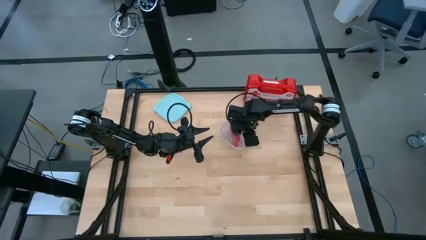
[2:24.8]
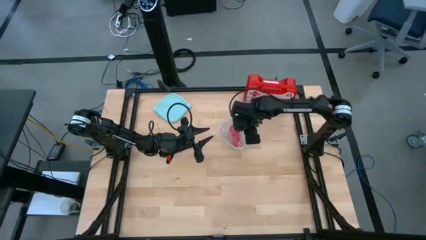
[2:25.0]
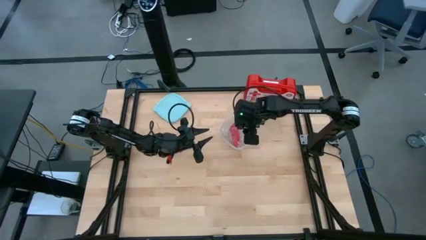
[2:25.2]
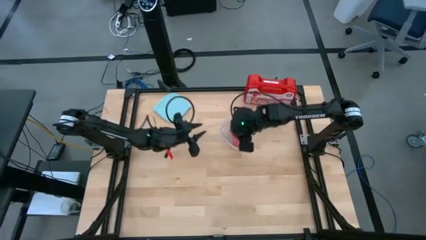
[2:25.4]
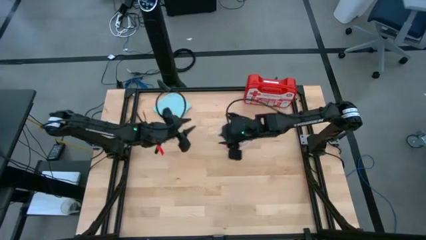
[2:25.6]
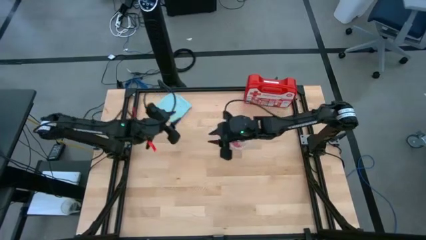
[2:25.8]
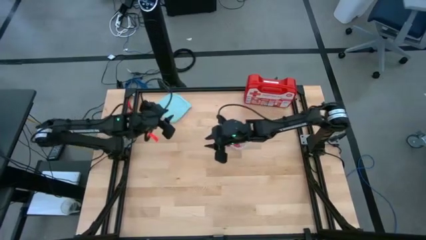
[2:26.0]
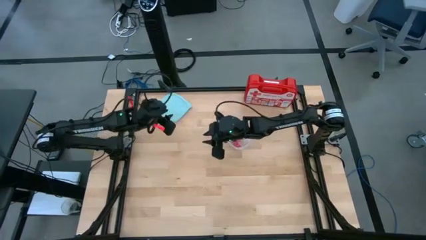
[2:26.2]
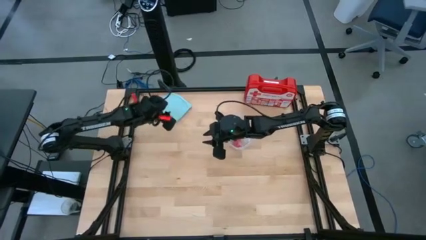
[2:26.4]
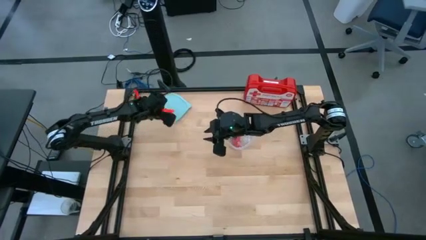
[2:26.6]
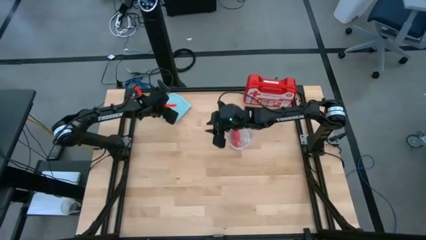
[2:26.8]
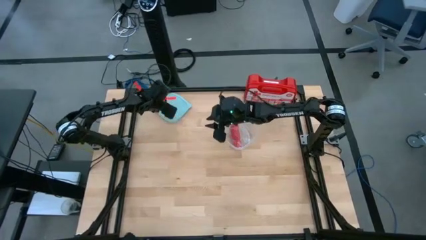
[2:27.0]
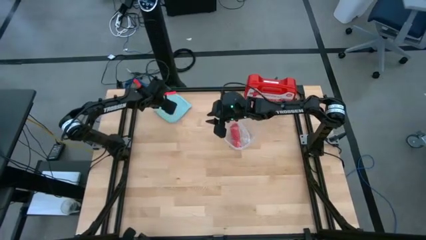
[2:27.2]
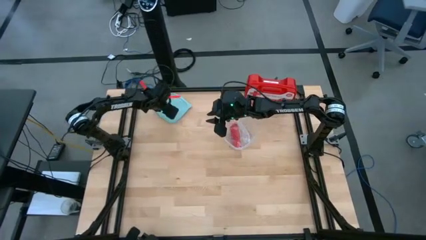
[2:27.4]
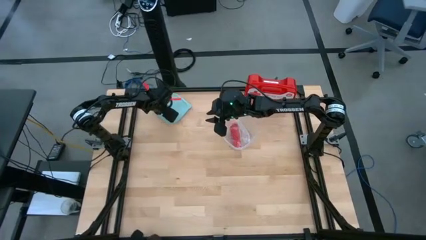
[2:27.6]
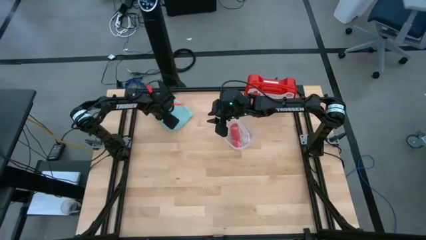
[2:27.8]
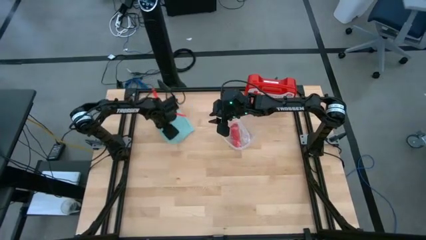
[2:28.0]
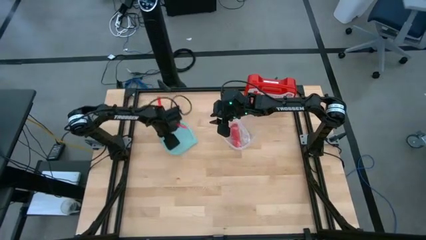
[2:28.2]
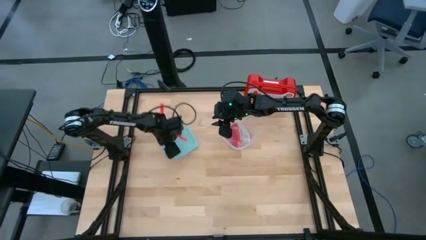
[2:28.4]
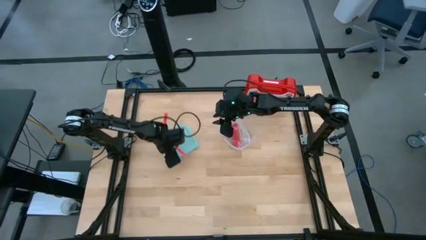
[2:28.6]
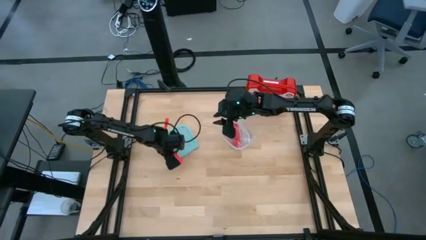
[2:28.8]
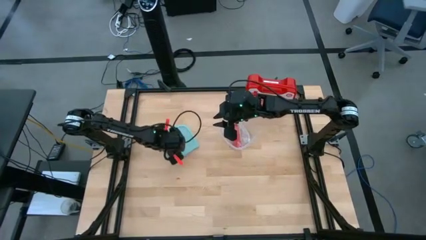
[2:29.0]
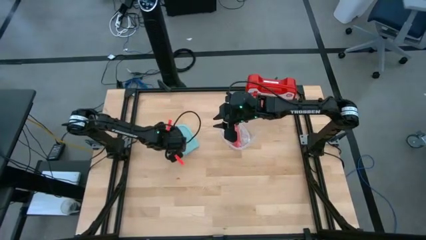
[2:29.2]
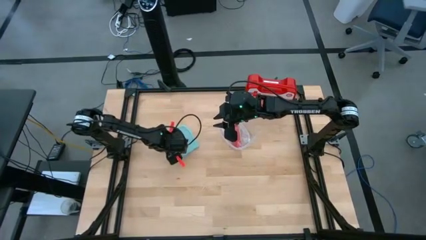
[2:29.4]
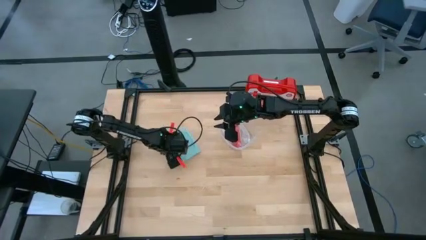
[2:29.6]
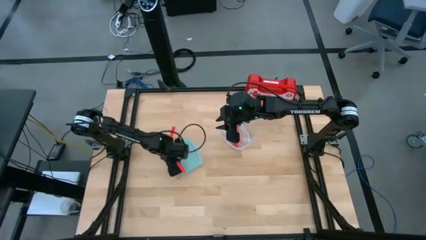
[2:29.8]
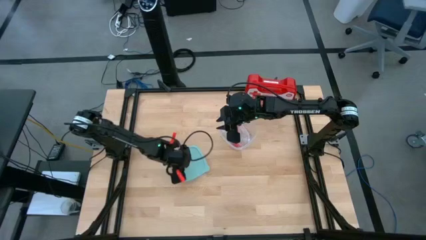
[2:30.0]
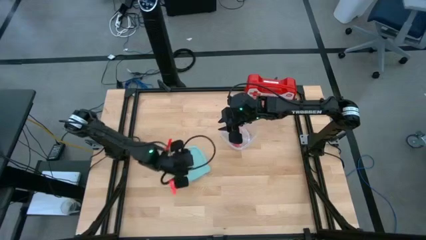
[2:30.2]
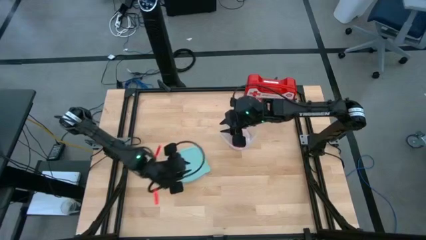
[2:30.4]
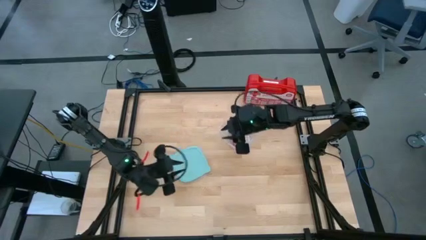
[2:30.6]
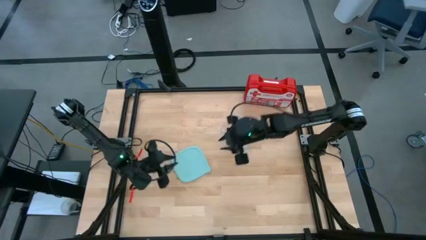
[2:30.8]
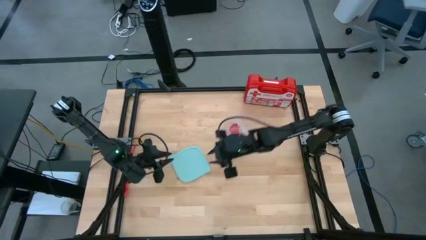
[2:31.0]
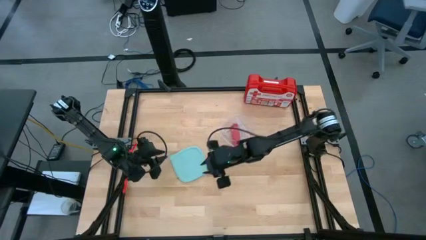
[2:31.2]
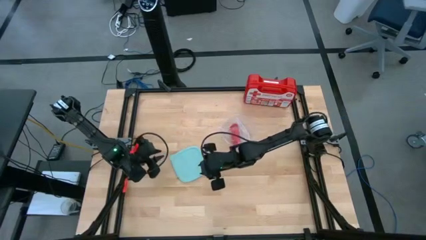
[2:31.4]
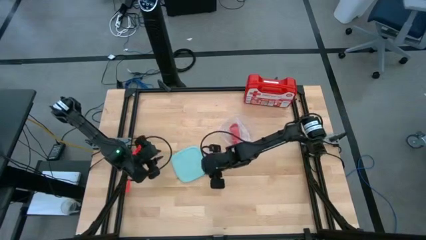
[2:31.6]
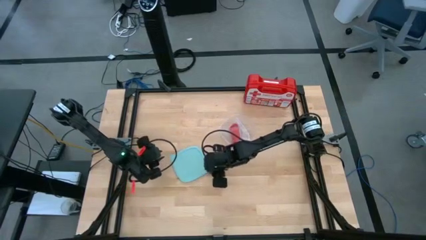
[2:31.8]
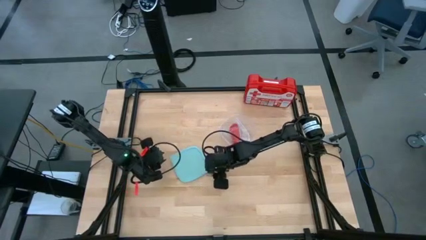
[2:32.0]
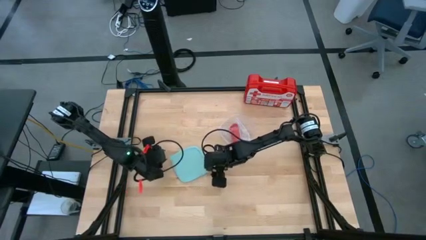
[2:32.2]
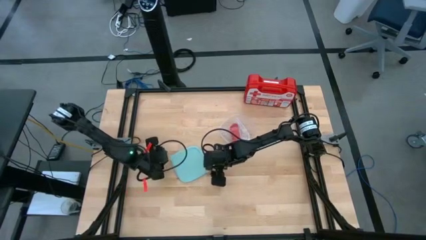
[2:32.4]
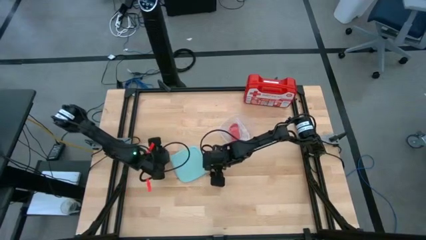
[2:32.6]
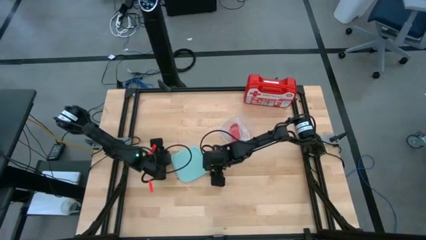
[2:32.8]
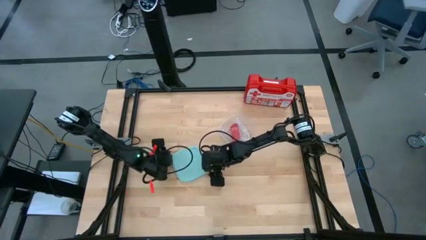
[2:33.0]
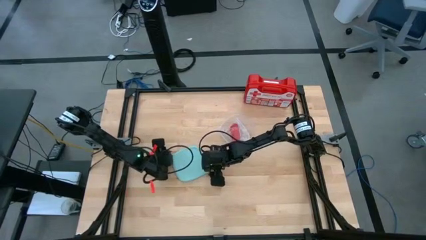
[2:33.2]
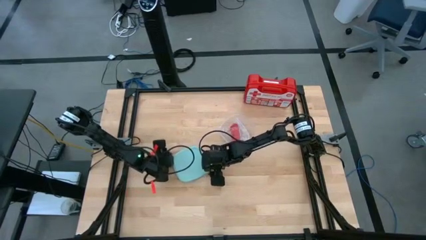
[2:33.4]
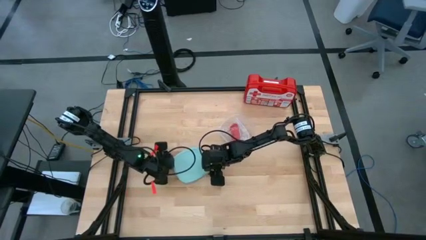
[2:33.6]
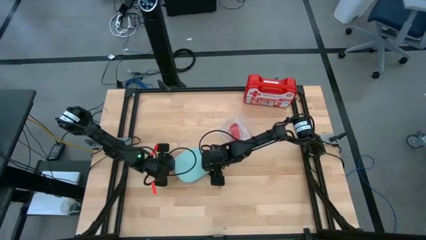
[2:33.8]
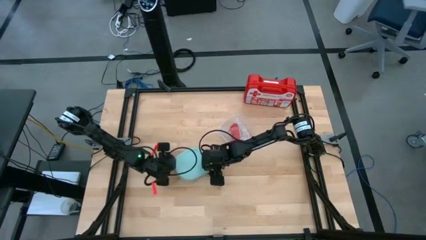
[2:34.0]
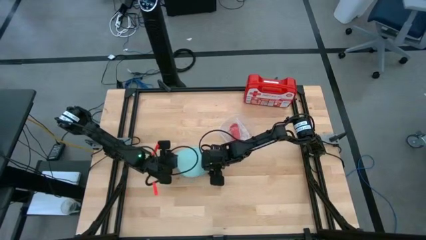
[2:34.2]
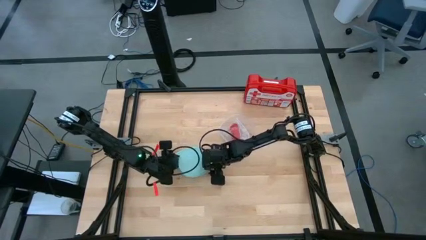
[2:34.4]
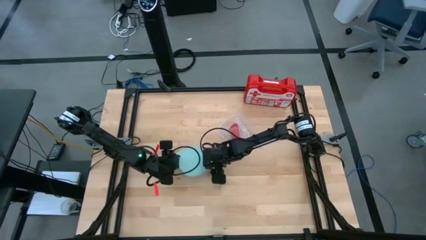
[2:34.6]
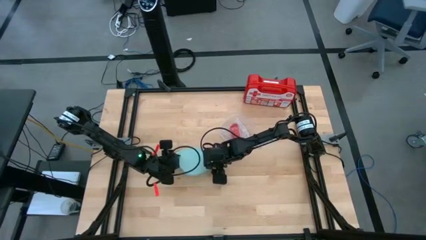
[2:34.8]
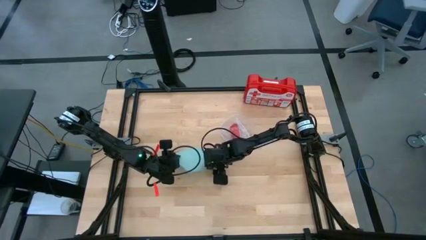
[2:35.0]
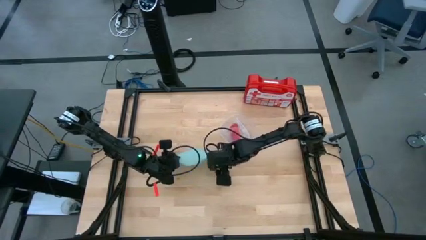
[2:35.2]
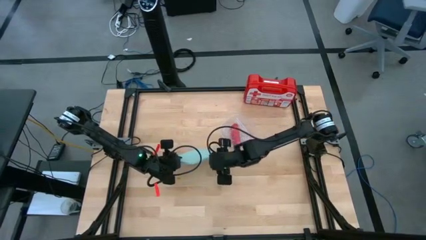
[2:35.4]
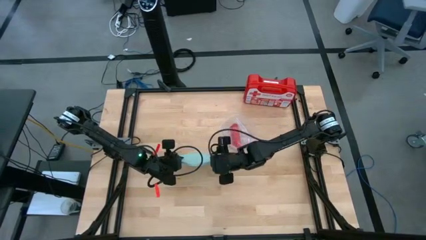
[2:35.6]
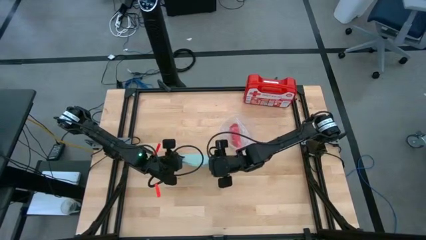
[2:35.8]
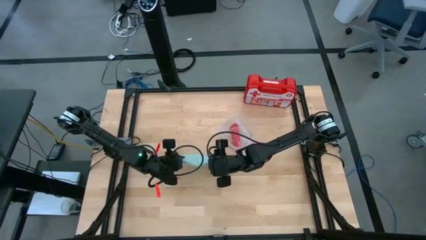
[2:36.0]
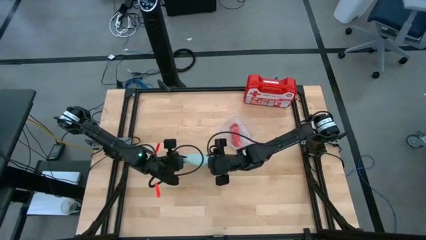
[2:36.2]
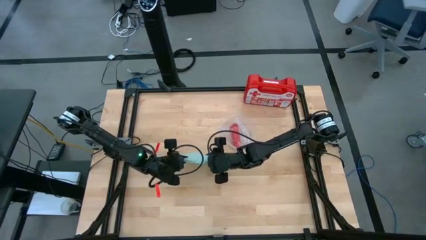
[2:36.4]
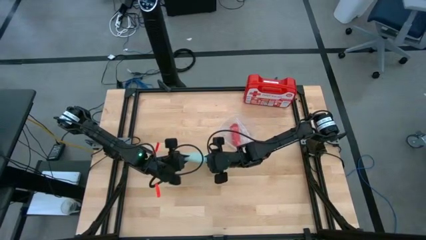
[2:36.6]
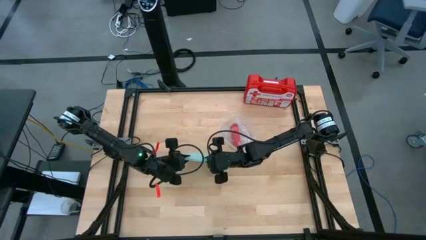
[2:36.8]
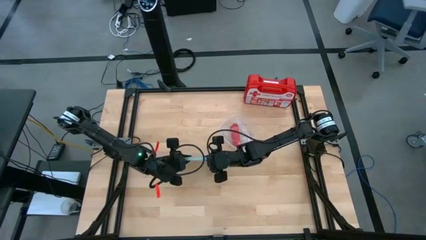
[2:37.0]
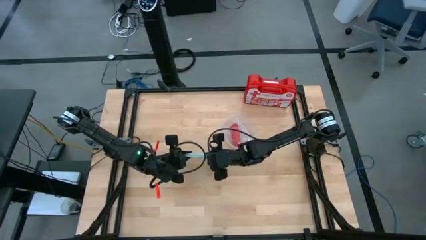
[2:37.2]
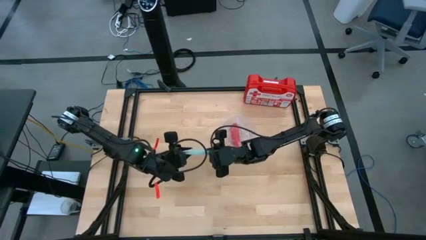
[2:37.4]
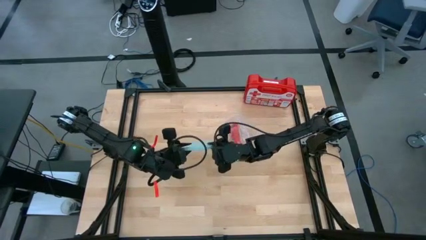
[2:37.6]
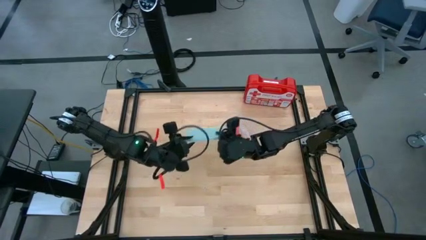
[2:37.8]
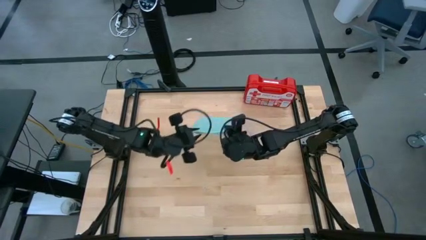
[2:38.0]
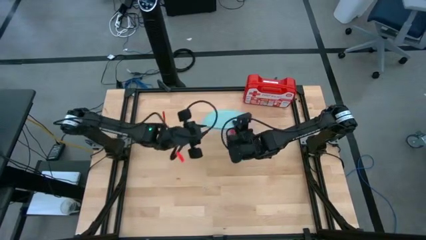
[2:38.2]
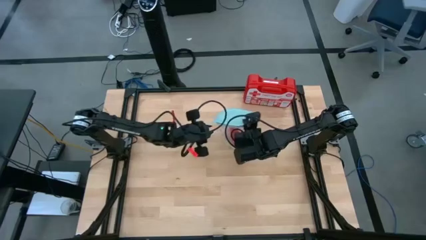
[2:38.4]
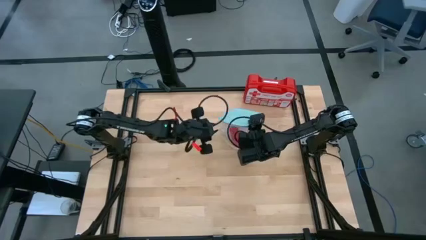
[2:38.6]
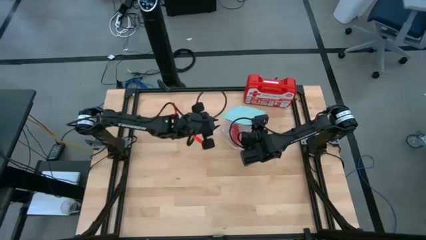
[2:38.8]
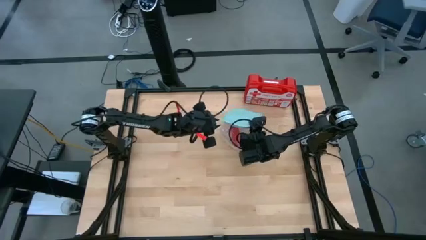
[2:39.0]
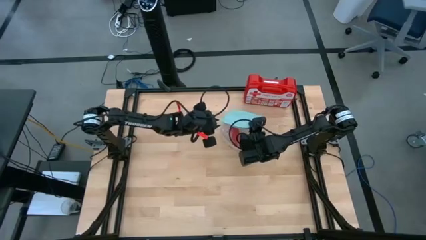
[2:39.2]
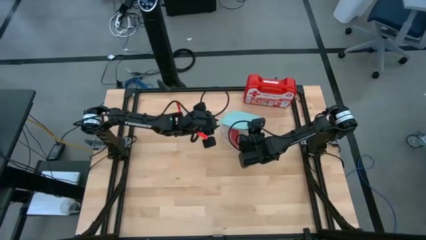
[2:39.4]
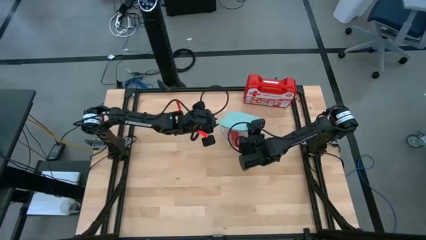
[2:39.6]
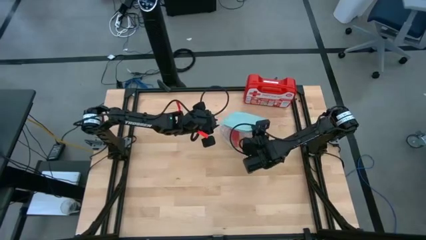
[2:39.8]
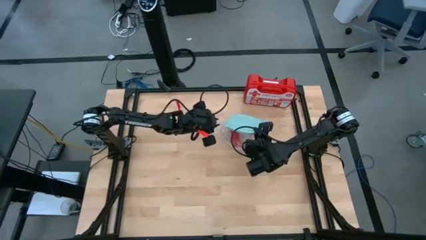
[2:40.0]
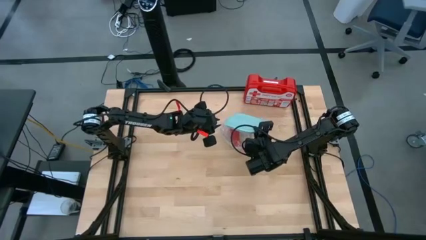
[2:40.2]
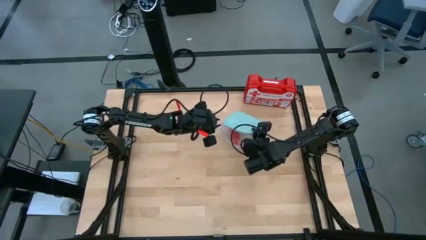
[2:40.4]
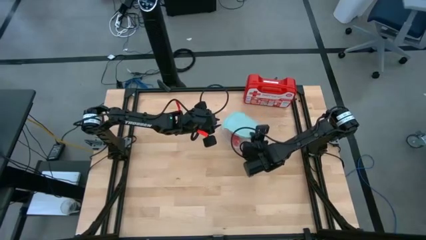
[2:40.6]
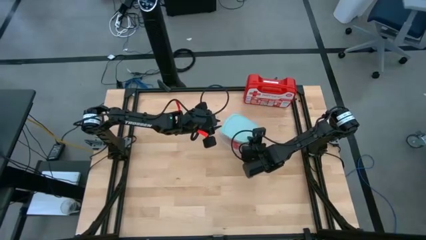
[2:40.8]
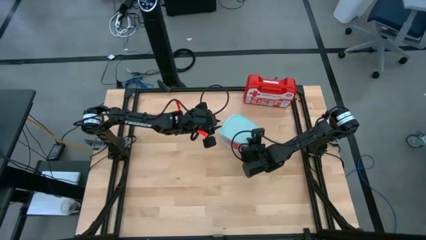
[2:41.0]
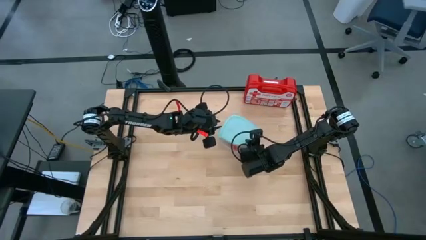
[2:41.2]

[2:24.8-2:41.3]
Task: Roll bandage
Close the transparent food container lid
